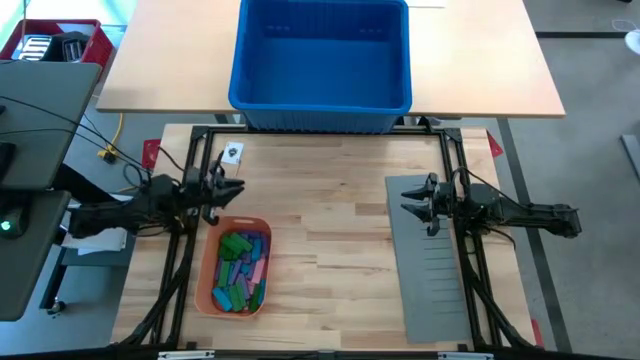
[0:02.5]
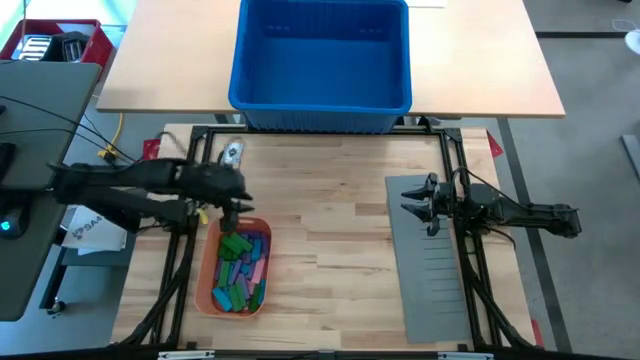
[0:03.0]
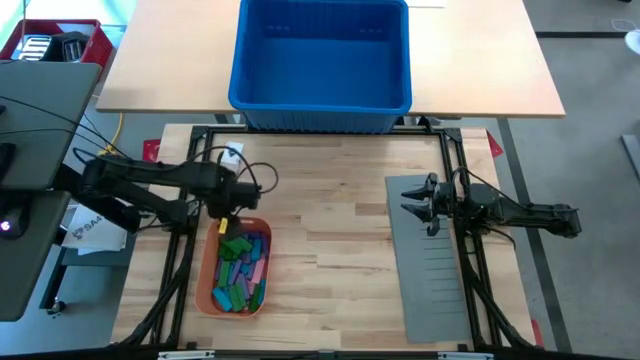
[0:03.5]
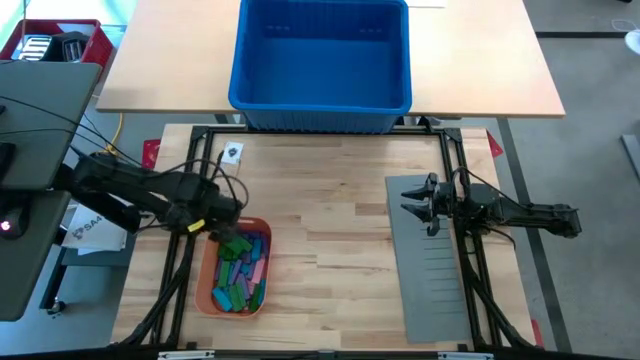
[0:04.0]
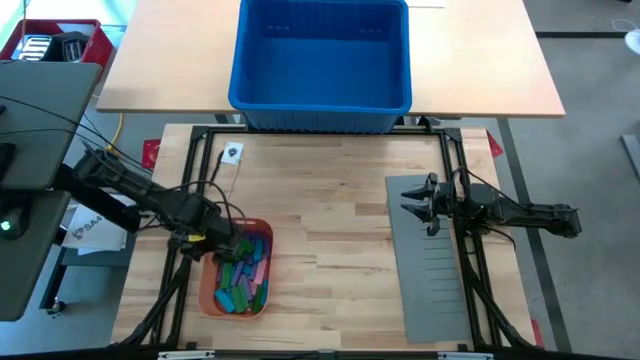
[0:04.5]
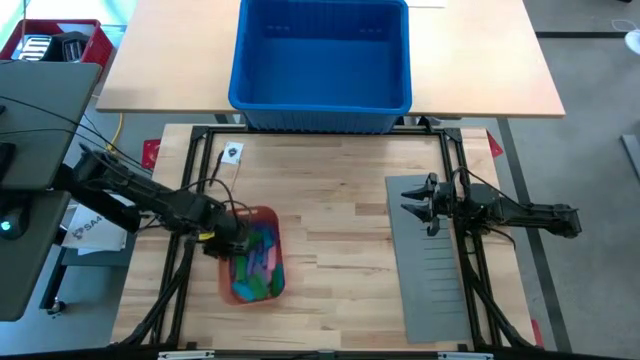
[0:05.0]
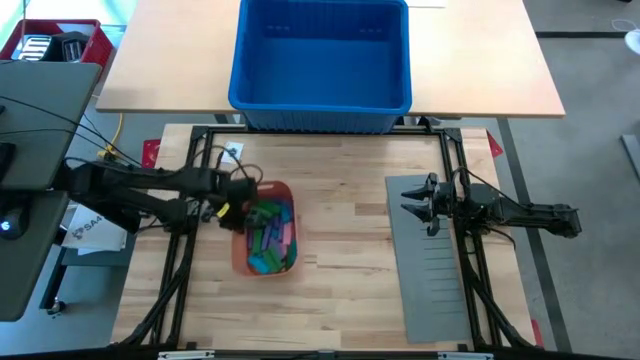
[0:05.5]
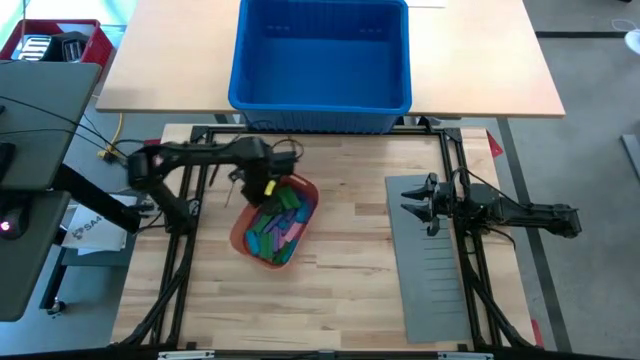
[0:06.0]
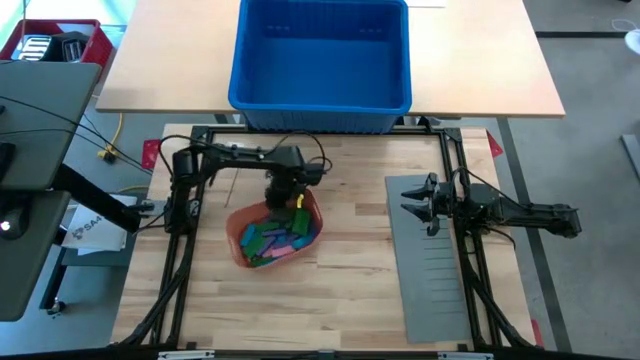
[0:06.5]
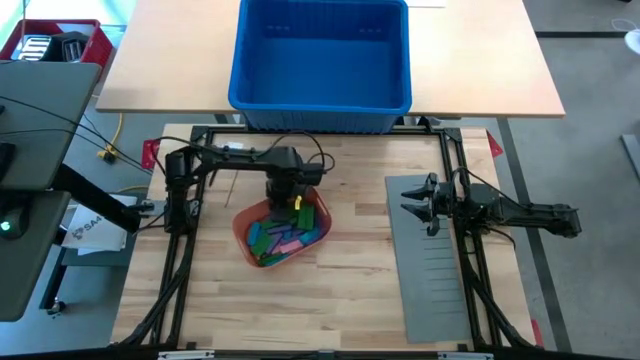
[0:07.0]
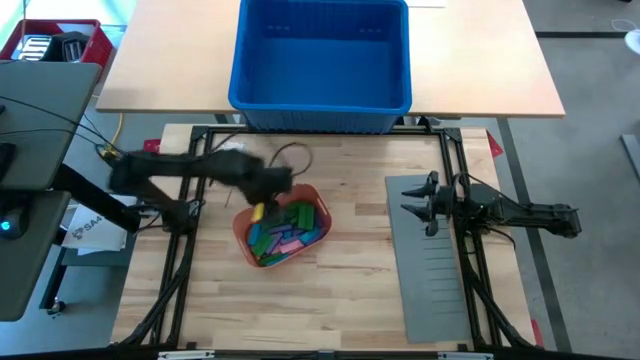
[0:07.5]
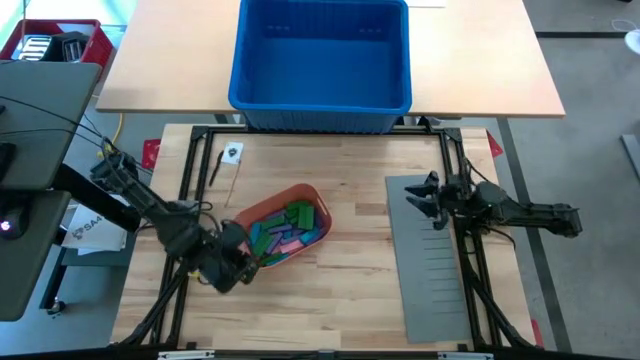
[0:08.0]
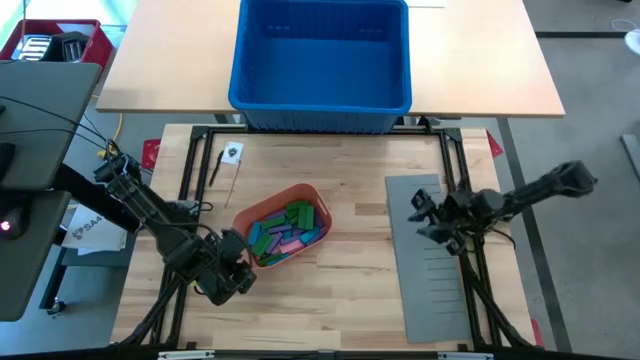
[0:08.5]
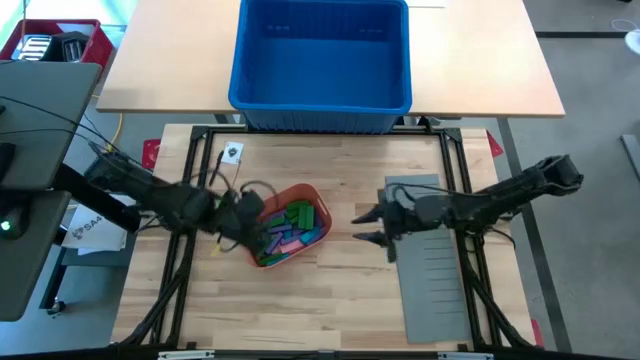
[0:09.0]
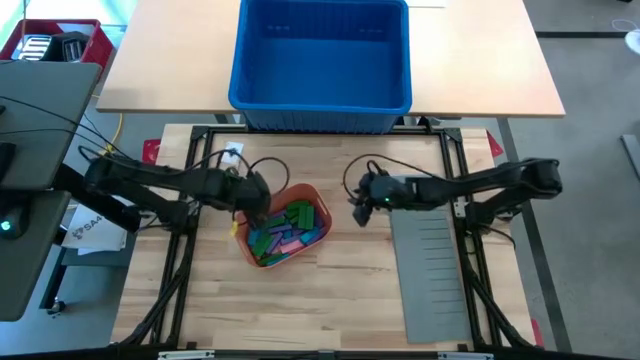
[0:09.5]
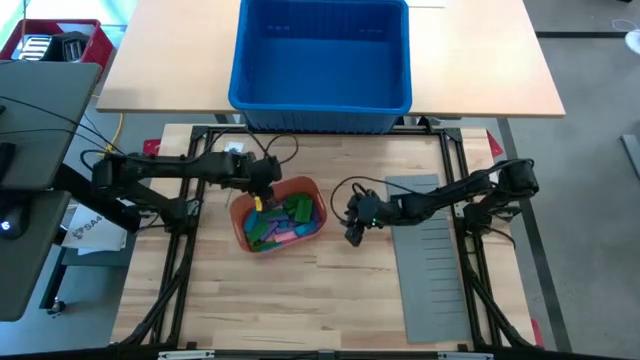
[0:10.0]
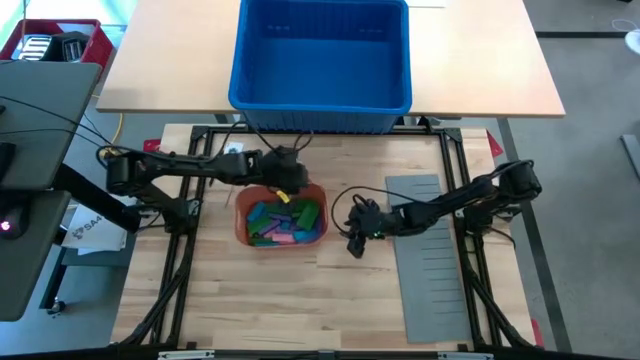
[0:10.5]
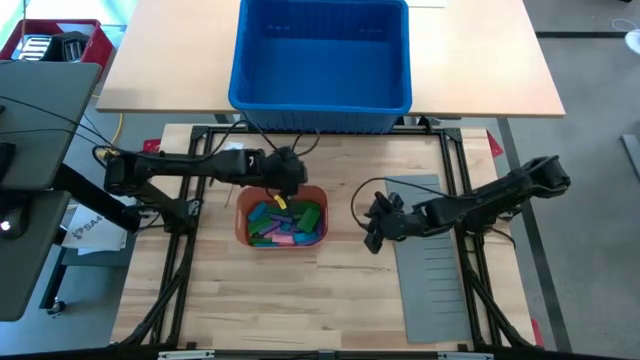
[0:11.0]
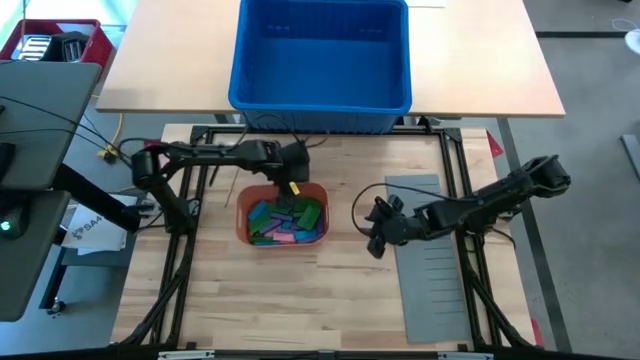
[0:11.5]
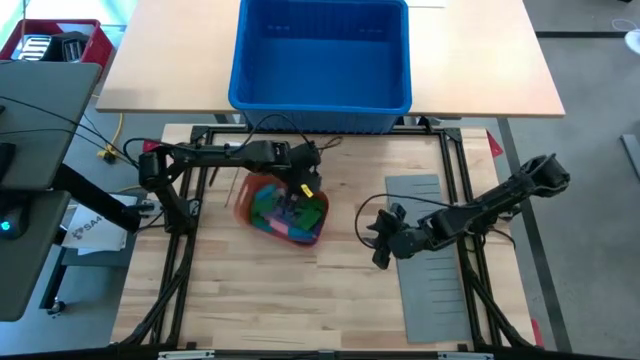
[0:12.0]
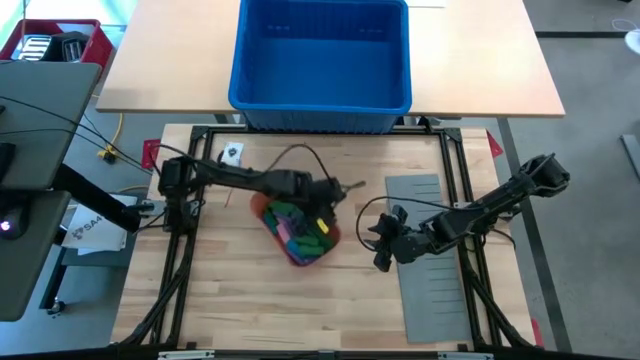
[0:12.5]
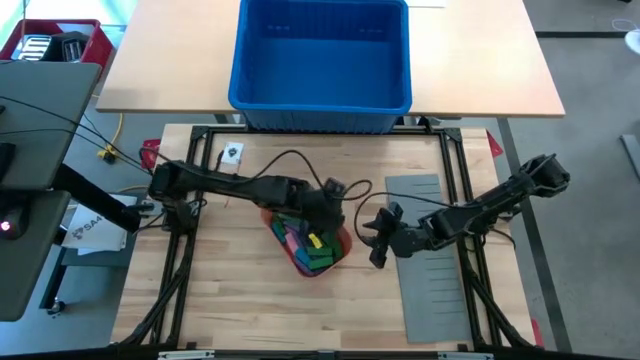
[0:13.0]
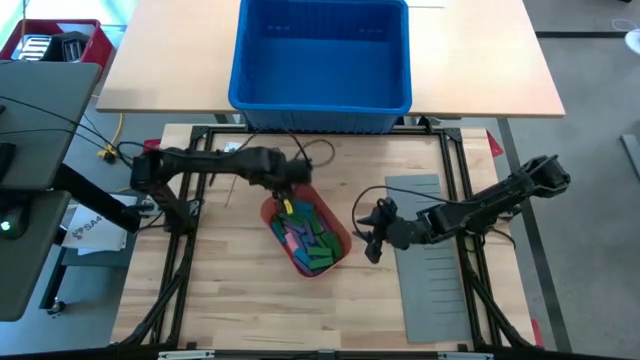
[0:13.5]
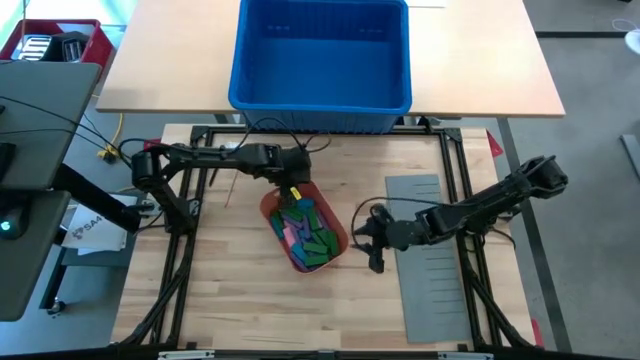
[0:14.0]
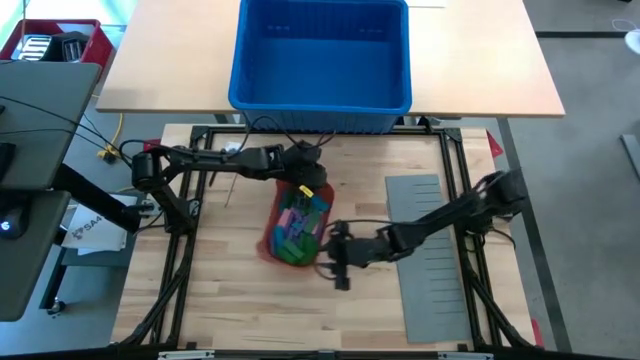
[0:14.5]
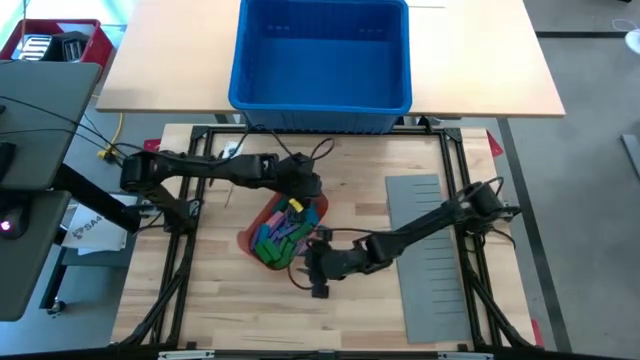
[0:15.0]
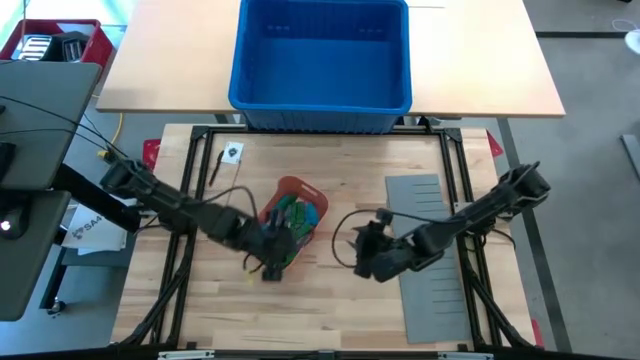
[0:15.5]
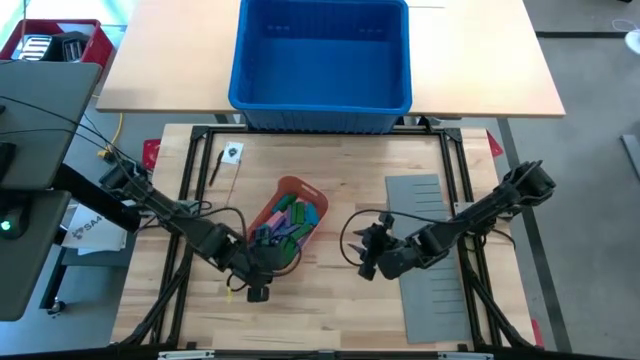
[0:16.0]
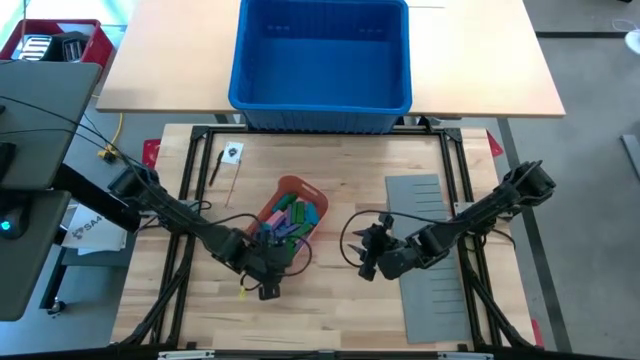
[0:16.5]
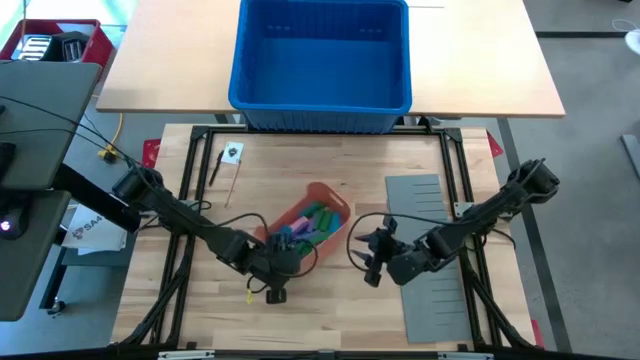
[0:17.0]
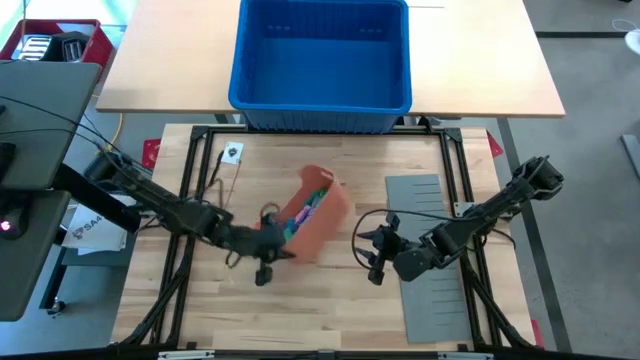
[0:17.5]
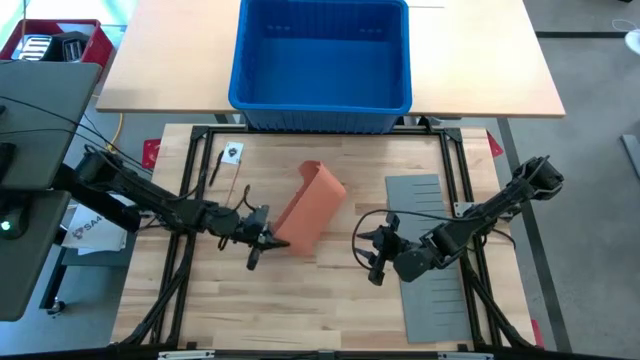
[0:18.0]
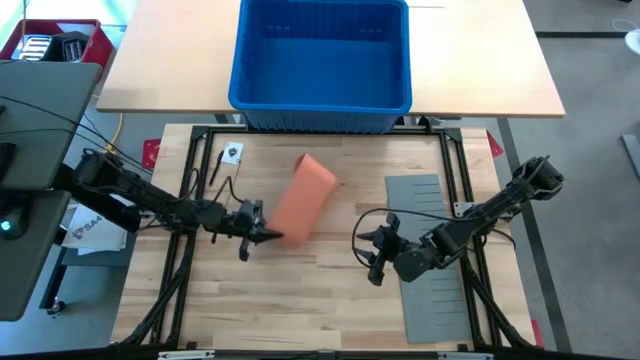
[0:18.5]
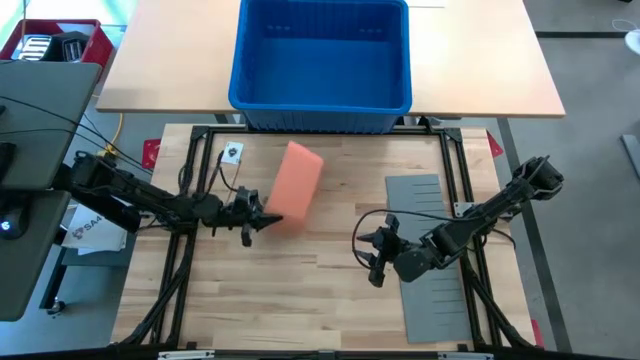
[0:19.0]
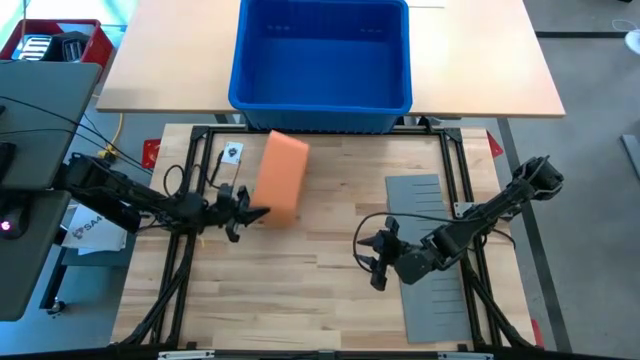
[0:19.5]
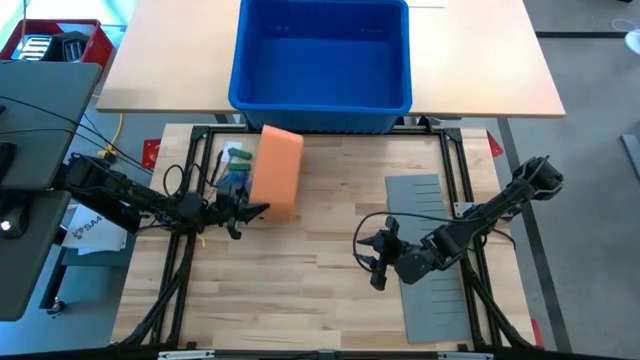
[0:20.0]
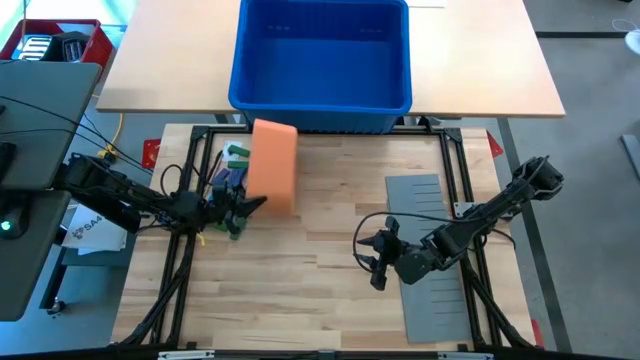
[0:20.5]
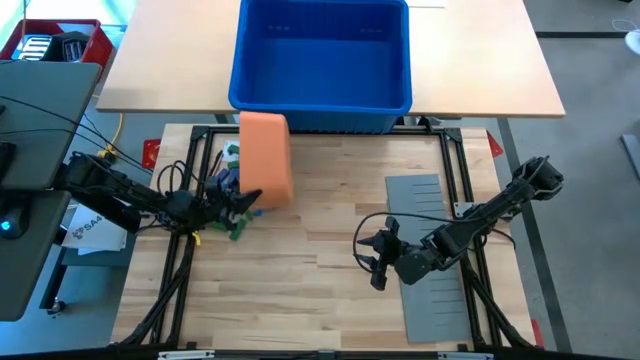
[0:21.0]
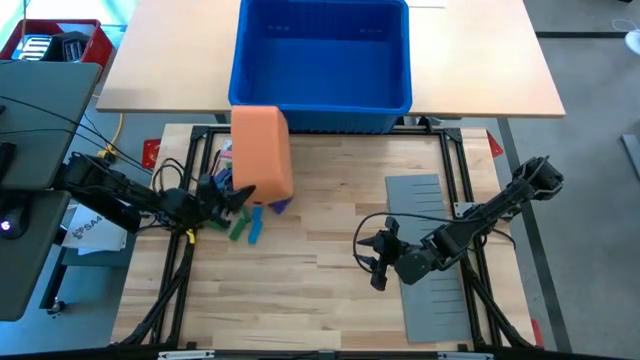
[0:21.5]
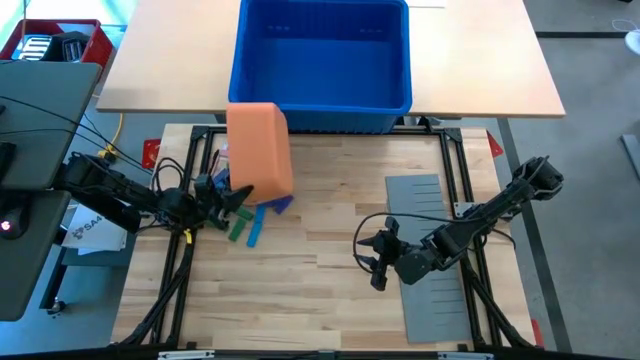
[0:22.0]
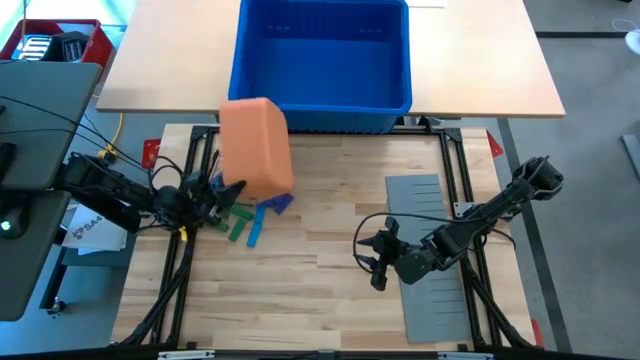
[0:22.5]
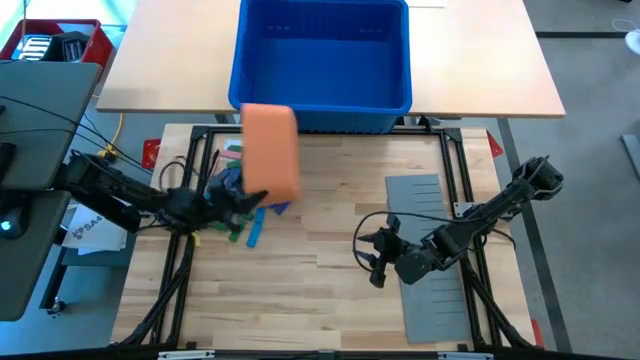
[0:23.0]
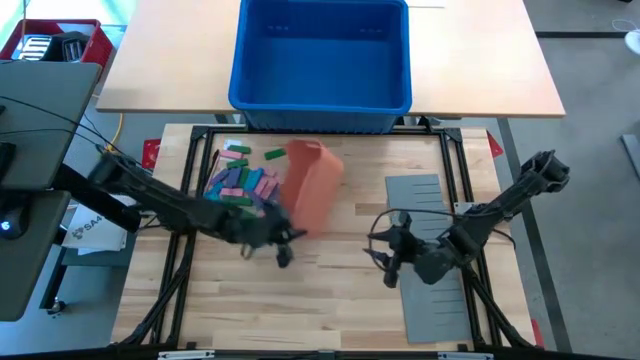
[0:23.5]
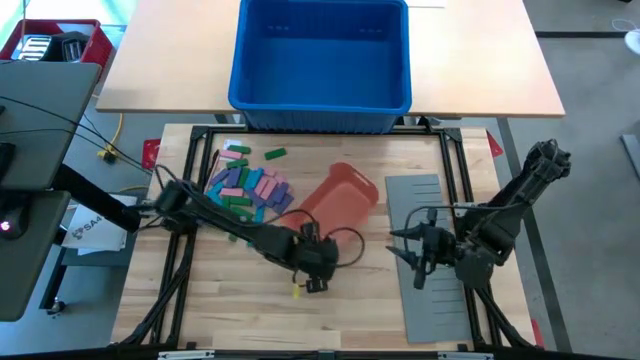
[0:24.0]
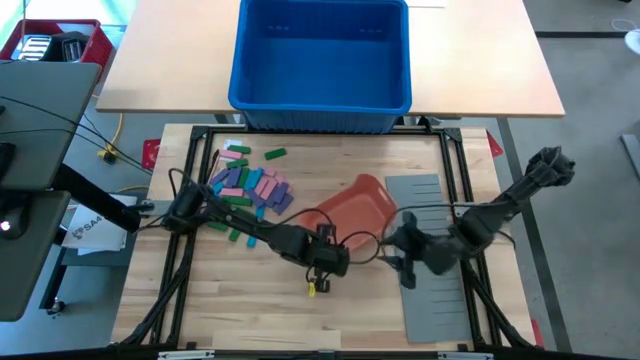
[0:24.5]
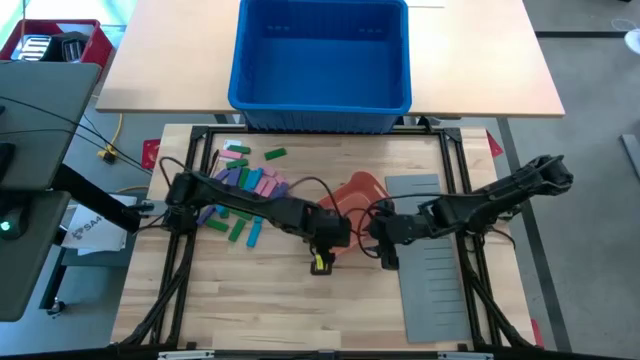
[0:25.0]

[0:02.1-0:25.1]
Task: Sort blocks
Remove the blocks from the orange bin
